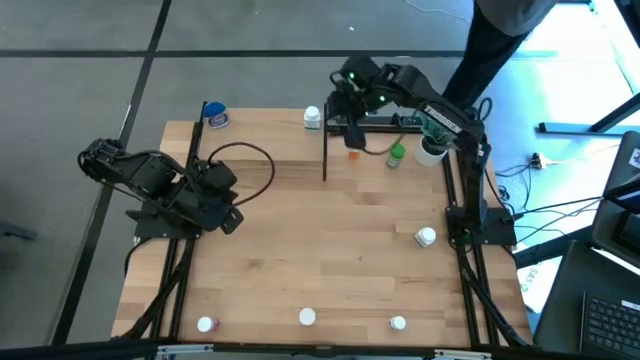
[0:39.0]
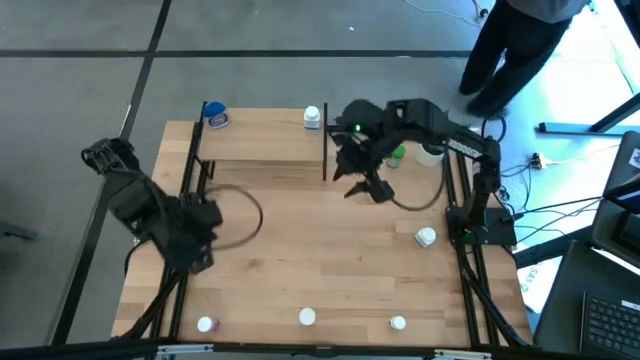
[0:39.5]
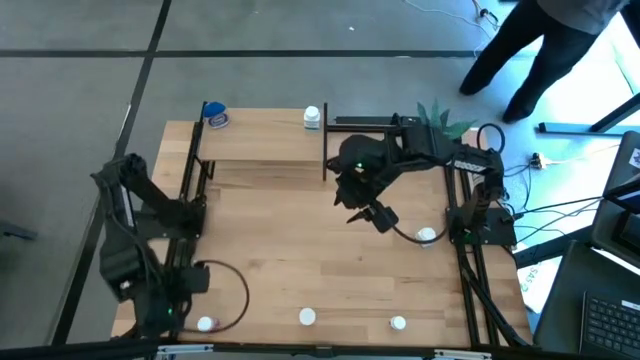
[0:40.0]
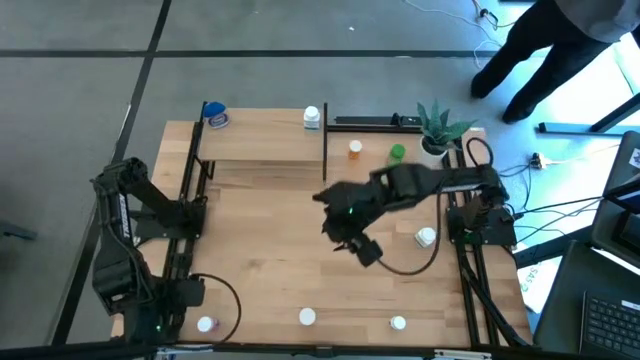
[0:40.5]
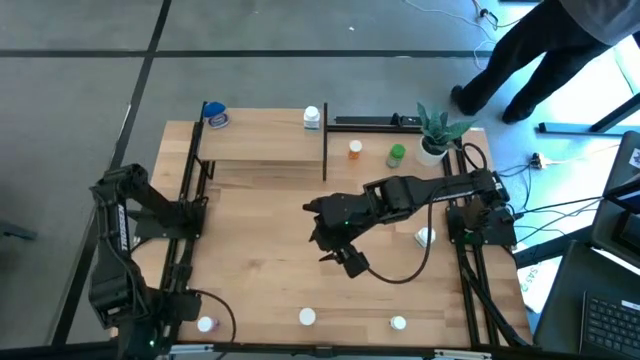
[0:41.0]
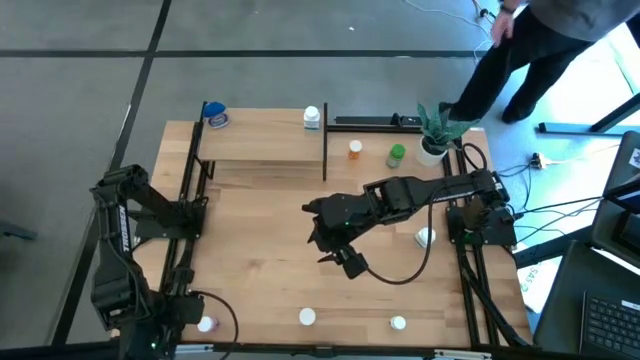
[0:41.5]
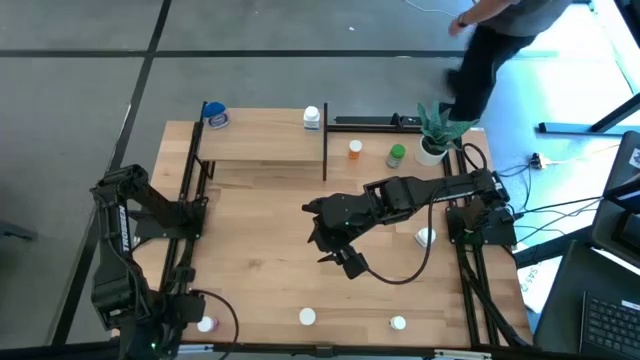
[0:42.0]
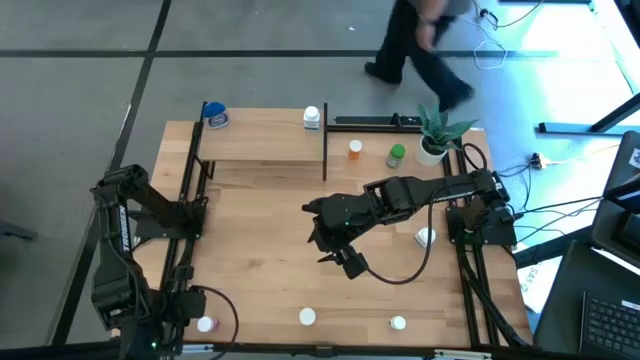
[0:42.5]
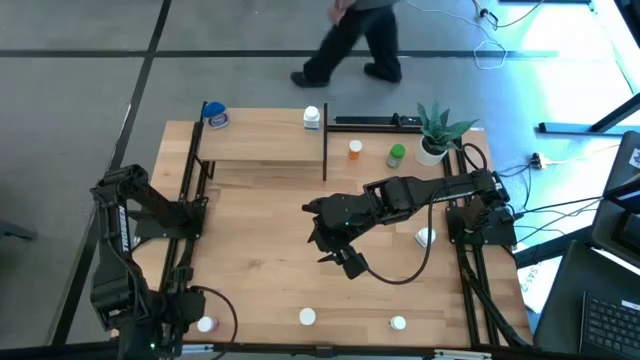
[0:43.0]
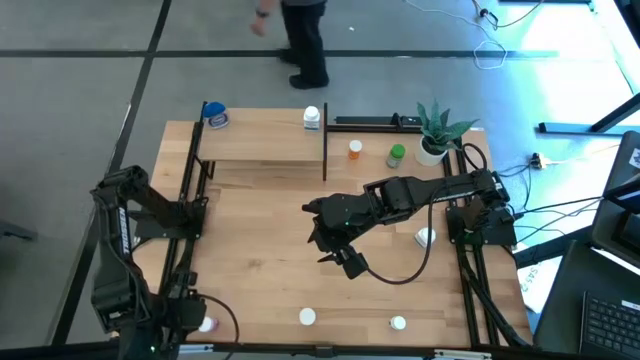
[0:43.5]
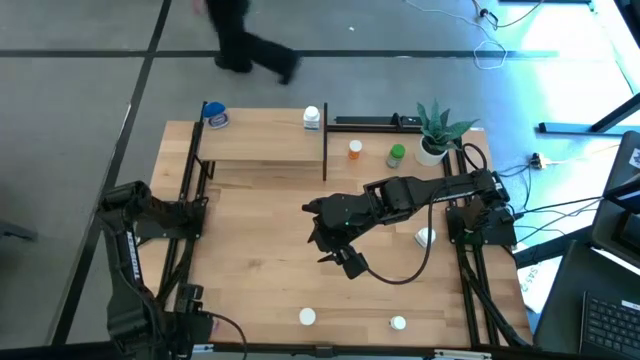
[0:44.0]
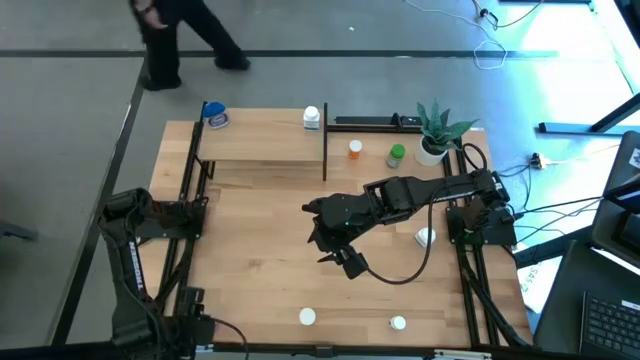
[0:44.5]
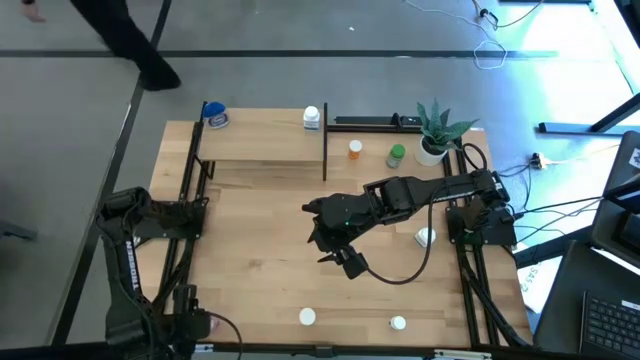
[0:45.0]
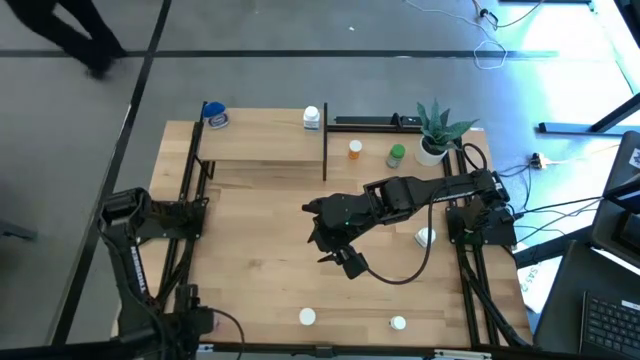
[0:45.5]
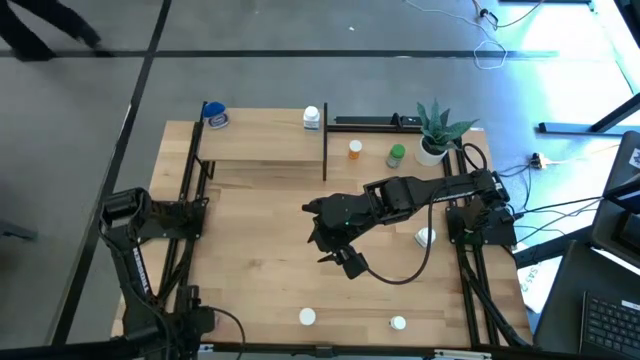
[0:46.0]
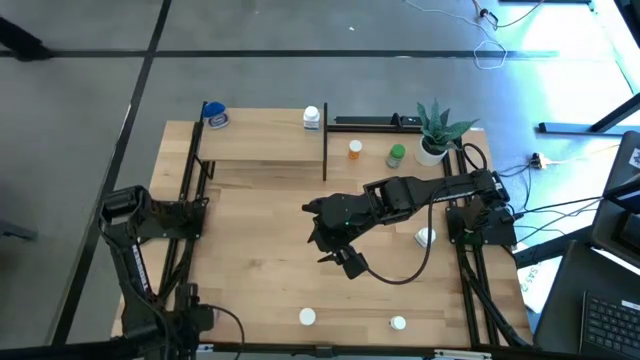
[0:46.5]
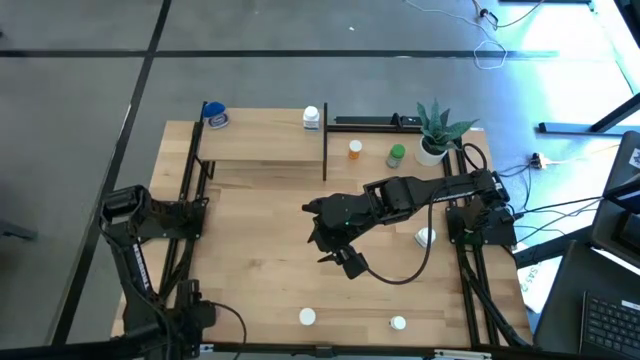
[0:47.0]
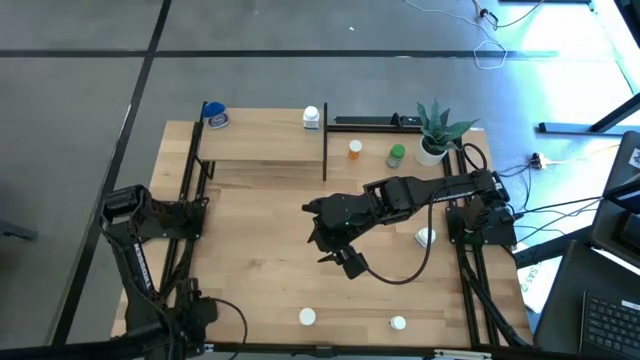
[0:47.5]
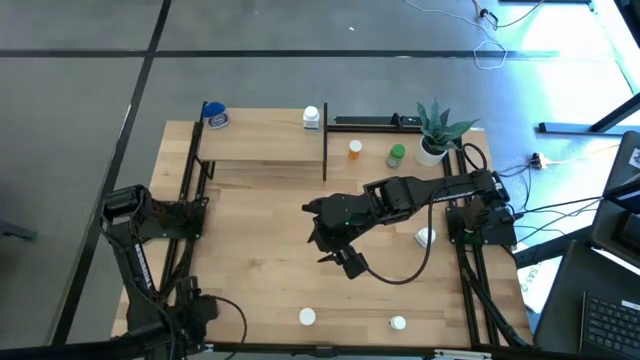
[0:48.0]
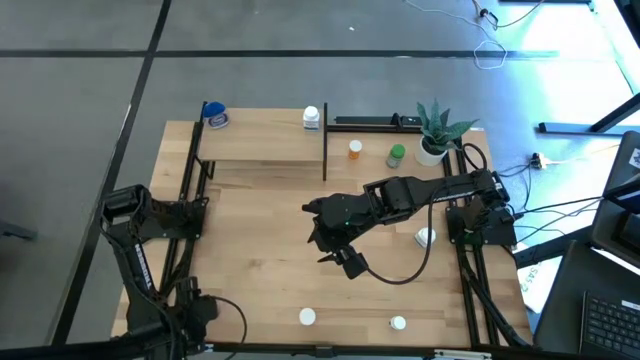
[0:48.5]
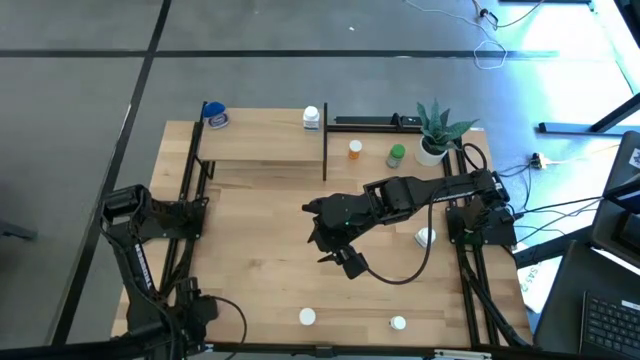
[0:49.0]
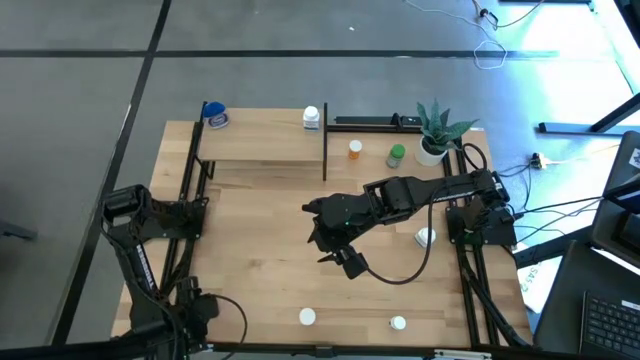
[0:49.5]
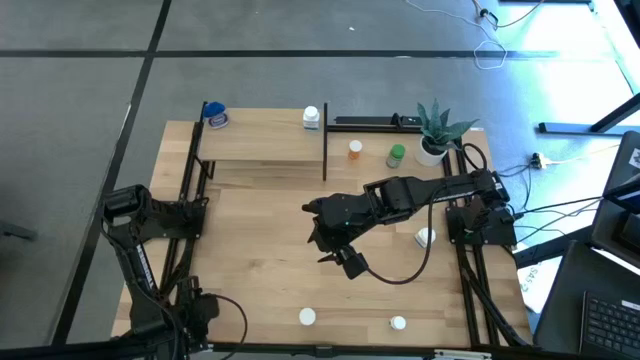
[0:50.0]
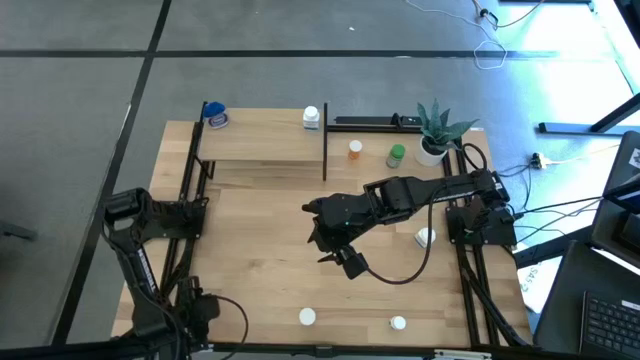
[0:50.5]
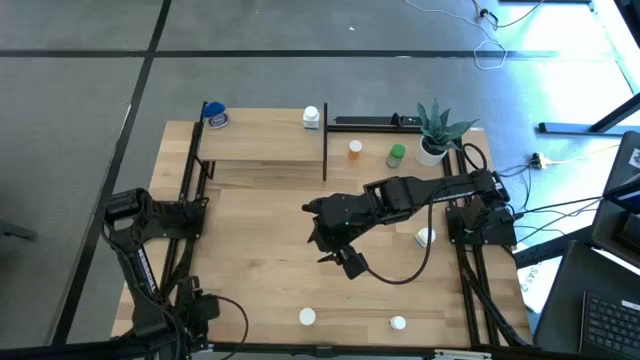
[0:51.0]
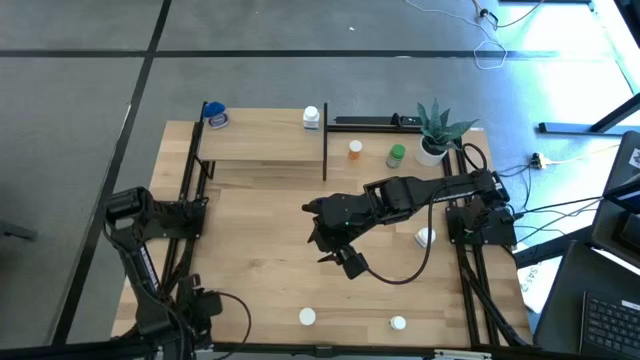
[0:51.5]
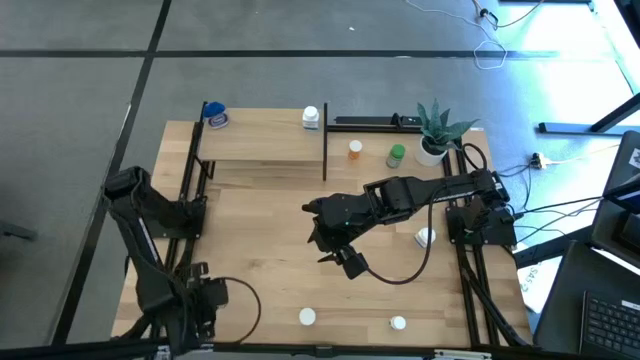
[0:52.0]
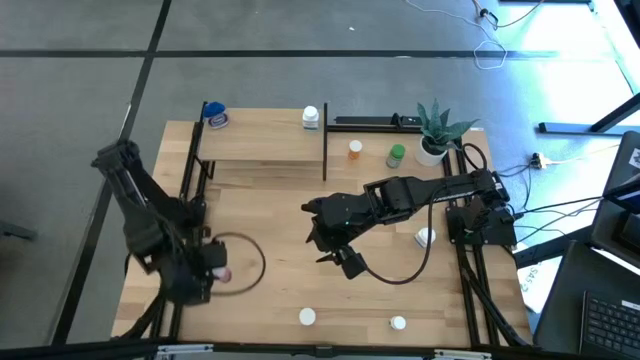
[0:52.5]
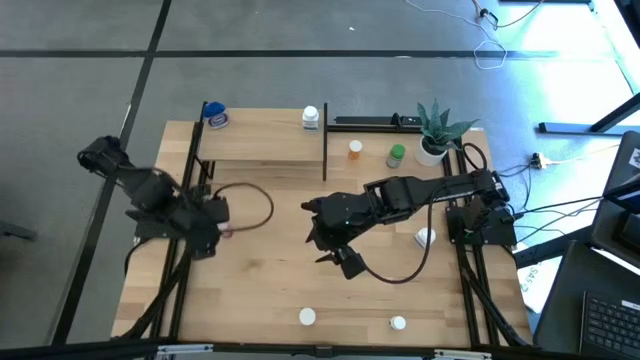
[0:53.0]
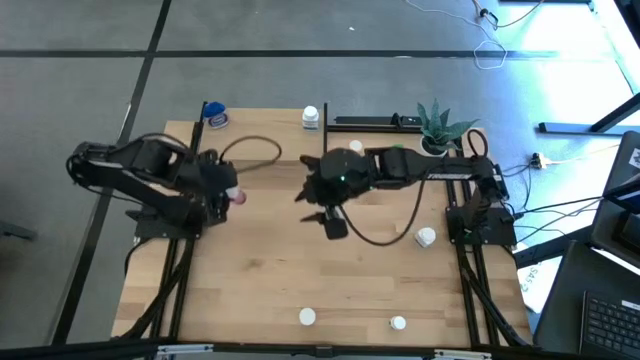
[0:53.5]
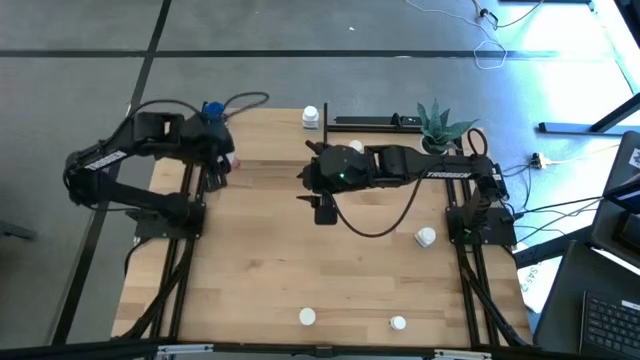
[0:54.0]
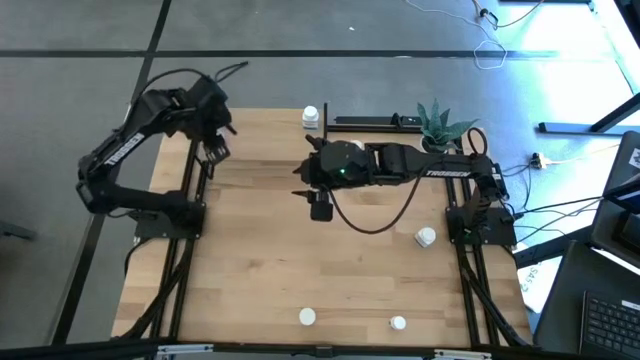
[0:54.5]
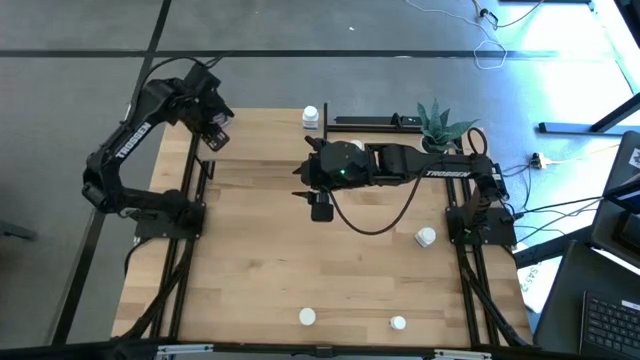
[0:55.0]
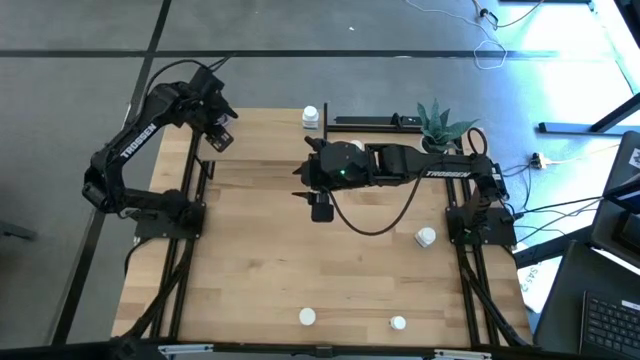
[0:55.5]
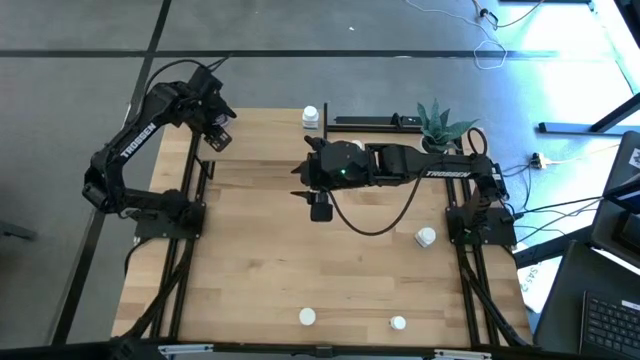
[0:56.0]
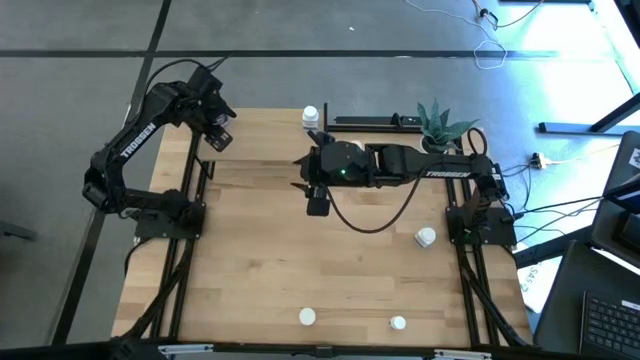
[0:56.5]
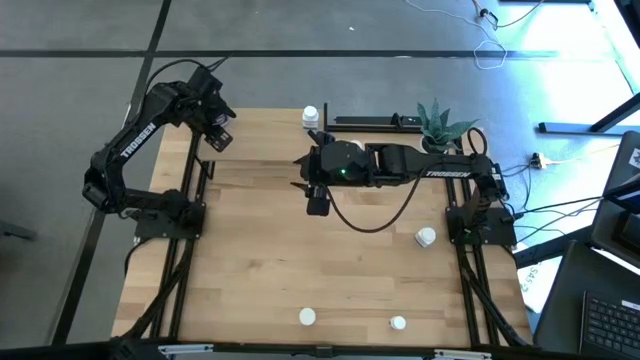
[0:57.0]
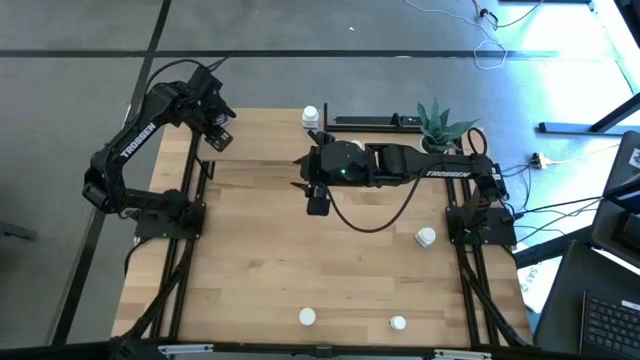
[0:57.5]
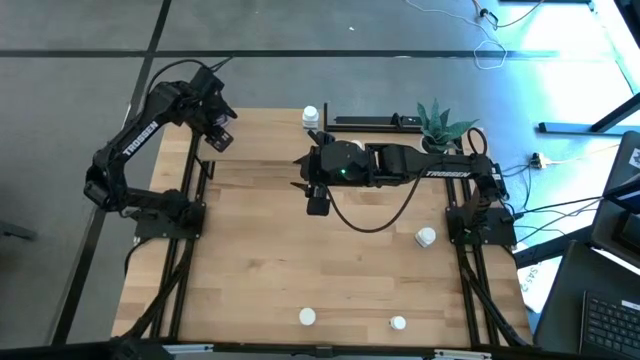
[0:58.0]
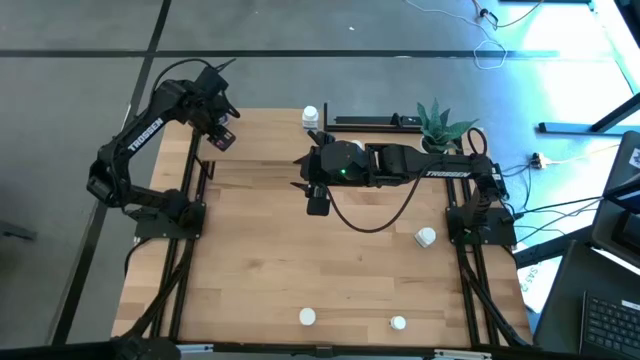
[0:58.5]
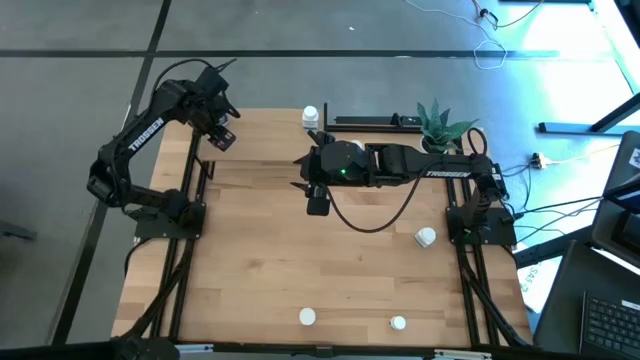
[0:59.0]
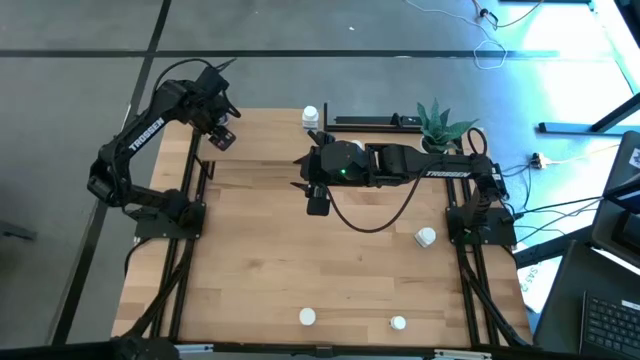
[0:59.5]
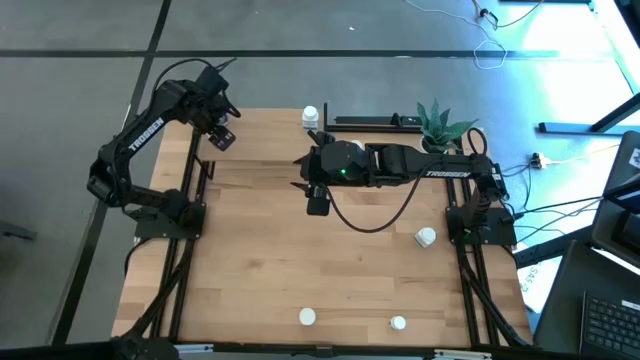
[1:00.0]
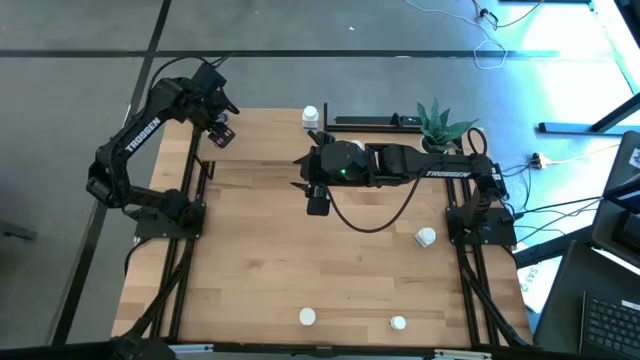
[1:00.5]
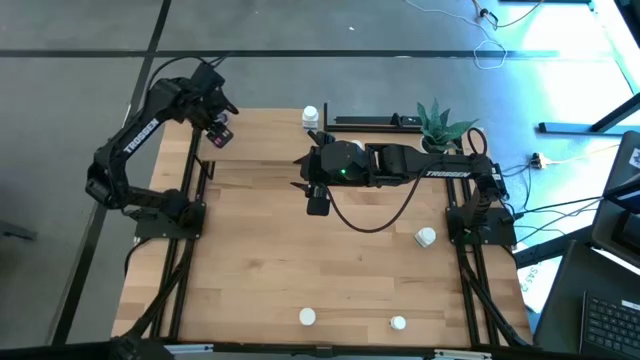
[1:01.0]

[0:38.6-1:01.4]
Task: Pick and place medicine bottles onto shelf by color
Put the pink pill bottle on the shelf
